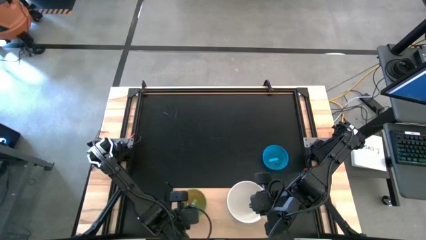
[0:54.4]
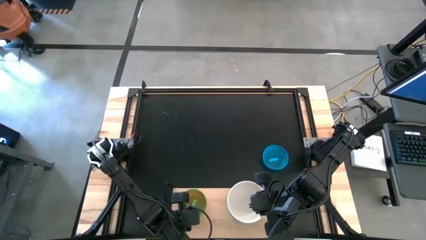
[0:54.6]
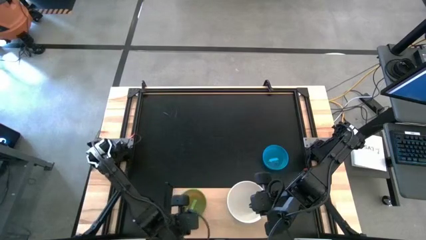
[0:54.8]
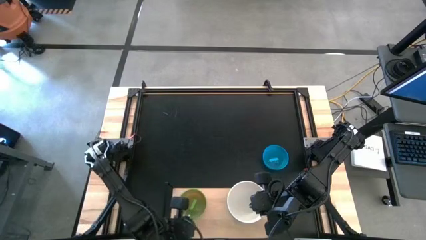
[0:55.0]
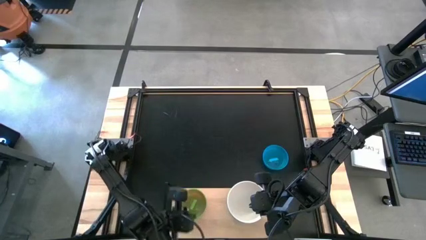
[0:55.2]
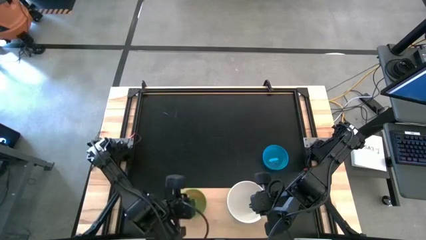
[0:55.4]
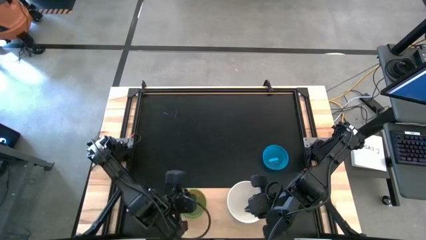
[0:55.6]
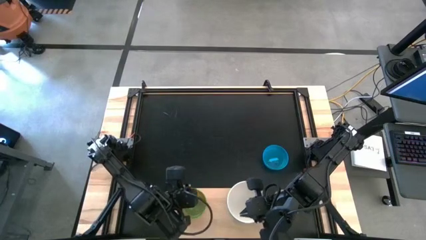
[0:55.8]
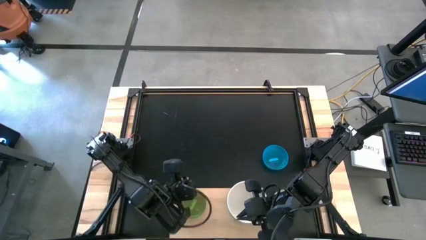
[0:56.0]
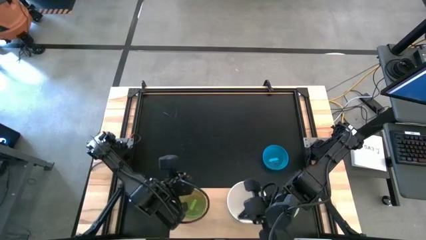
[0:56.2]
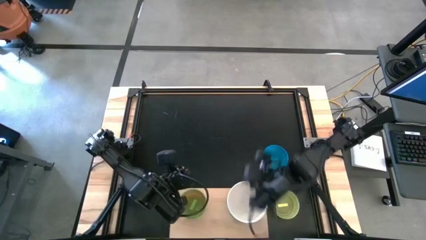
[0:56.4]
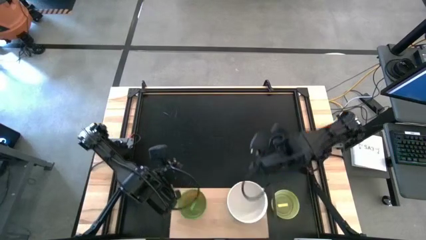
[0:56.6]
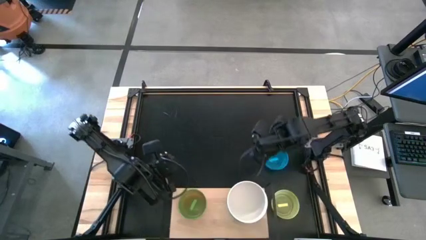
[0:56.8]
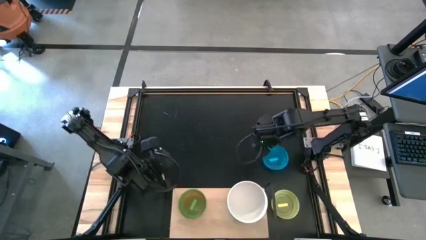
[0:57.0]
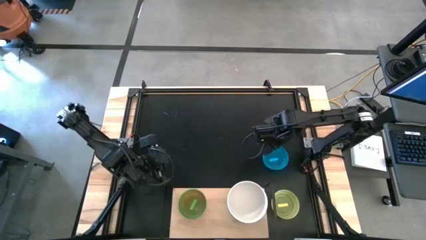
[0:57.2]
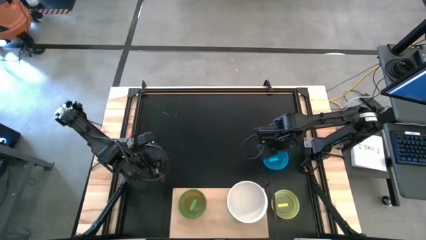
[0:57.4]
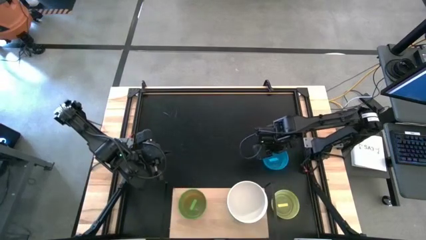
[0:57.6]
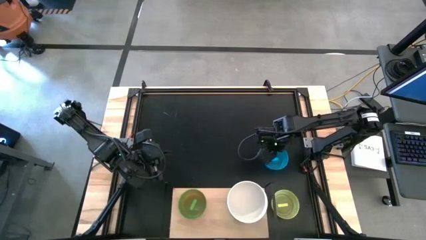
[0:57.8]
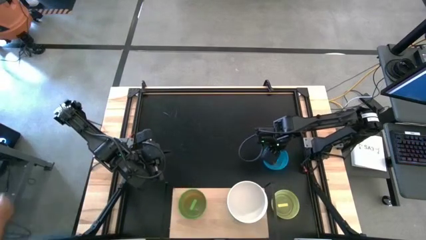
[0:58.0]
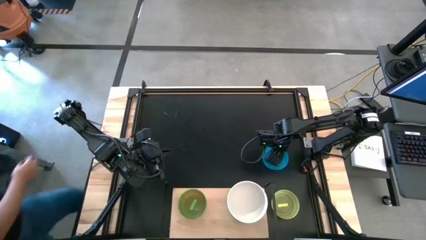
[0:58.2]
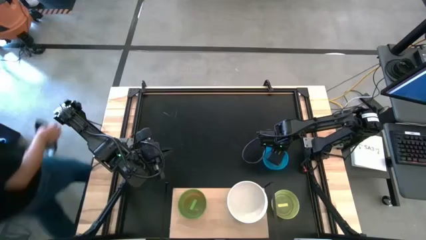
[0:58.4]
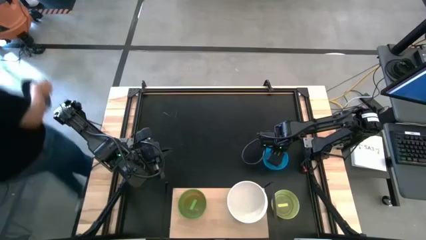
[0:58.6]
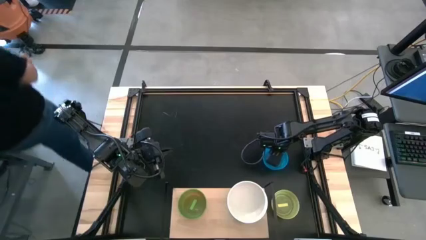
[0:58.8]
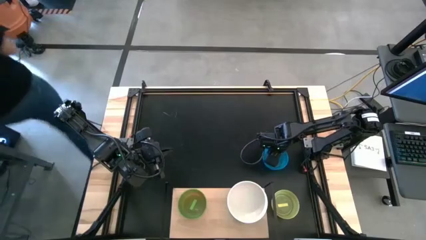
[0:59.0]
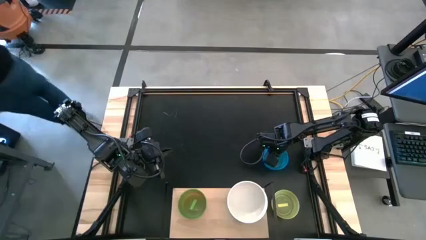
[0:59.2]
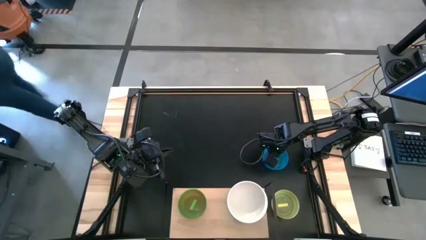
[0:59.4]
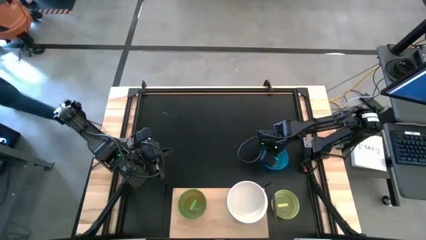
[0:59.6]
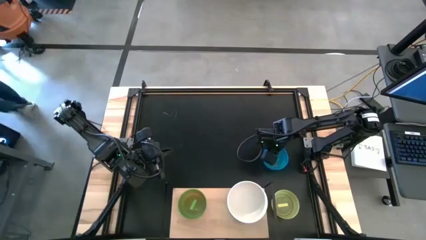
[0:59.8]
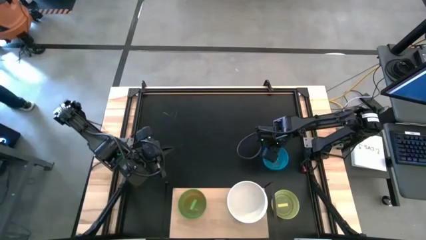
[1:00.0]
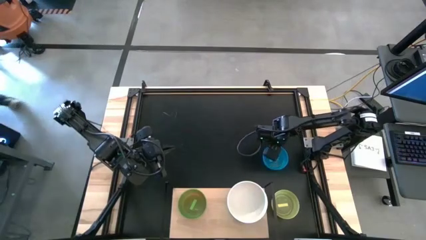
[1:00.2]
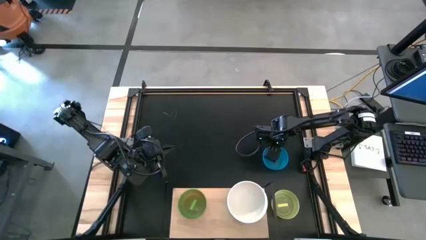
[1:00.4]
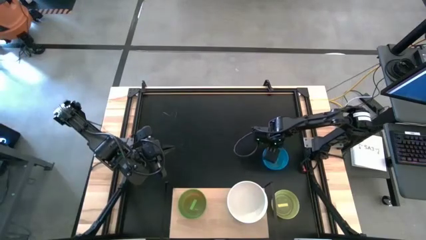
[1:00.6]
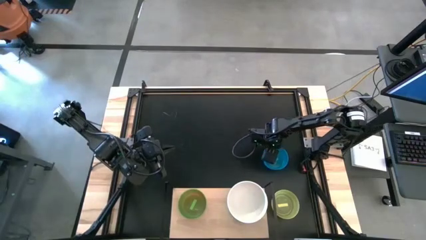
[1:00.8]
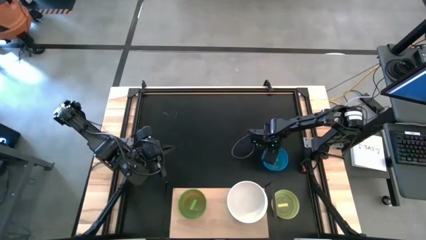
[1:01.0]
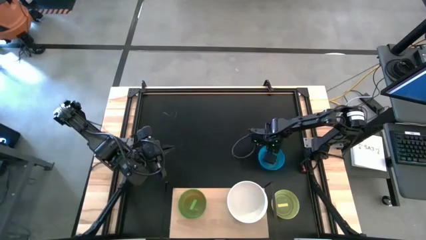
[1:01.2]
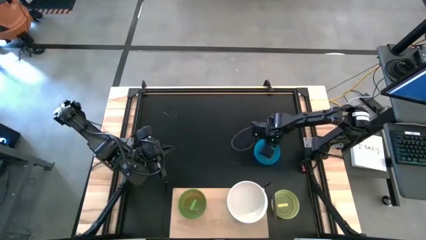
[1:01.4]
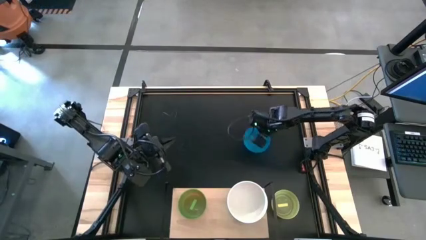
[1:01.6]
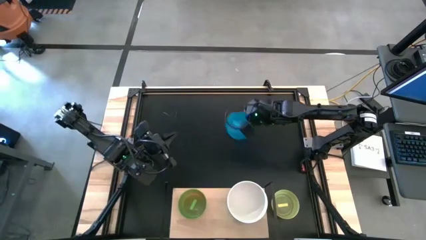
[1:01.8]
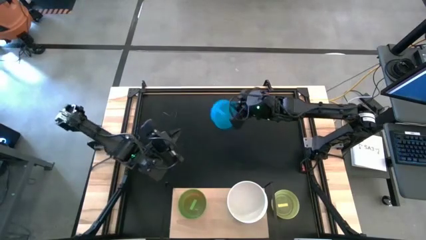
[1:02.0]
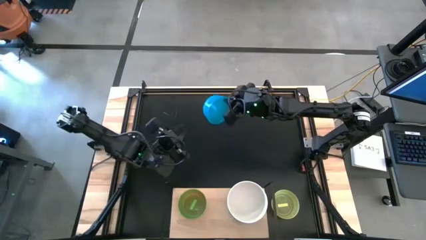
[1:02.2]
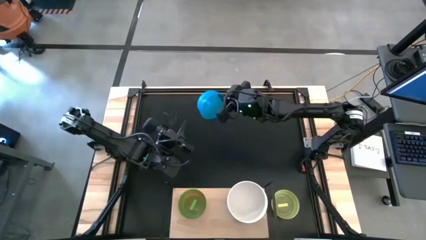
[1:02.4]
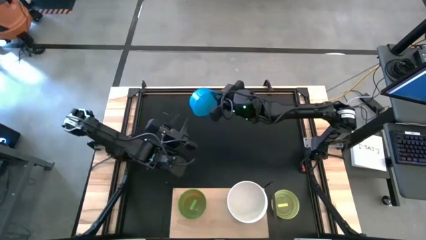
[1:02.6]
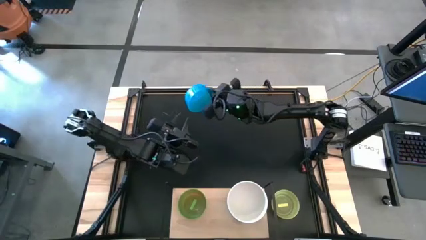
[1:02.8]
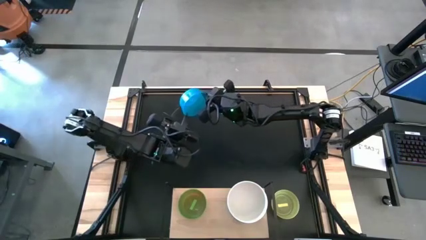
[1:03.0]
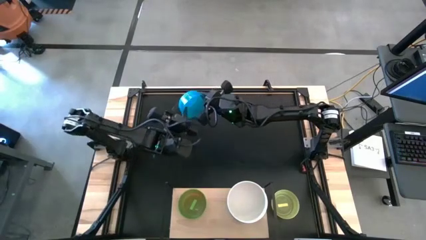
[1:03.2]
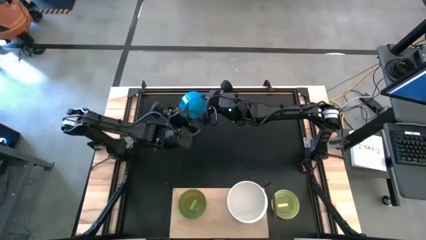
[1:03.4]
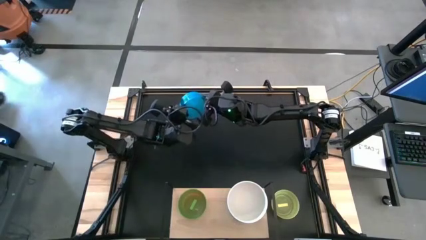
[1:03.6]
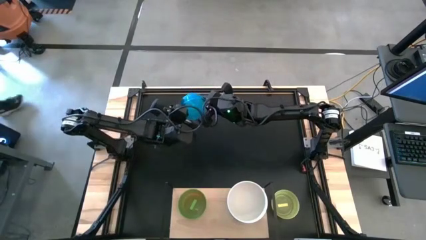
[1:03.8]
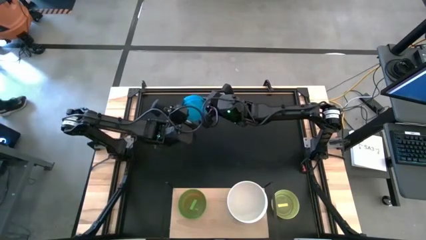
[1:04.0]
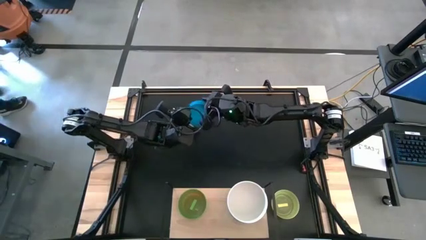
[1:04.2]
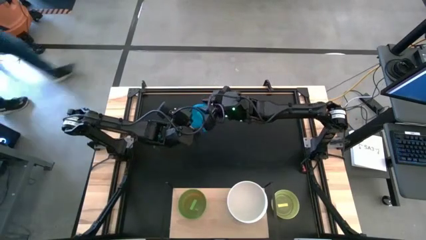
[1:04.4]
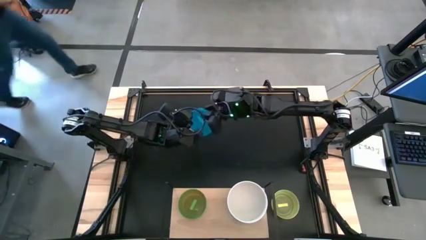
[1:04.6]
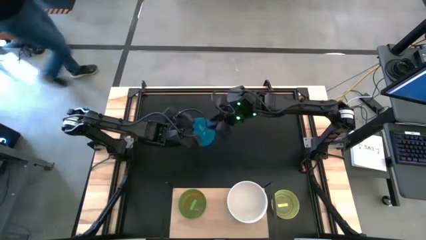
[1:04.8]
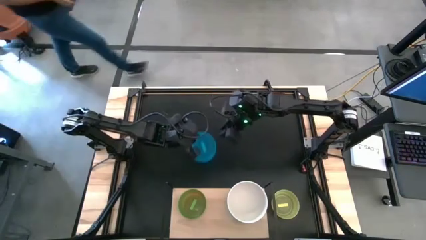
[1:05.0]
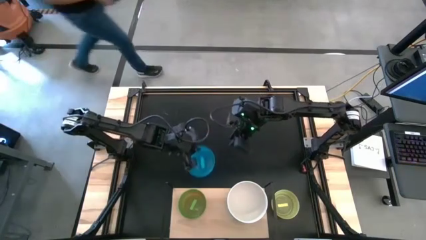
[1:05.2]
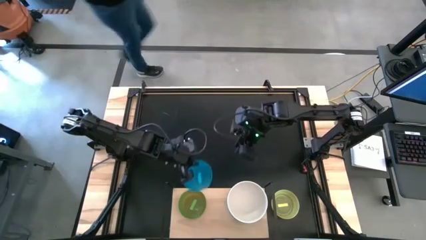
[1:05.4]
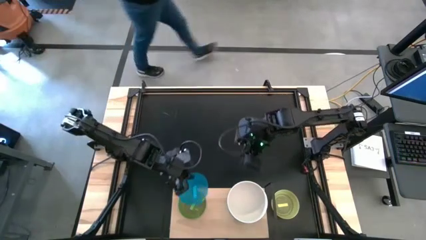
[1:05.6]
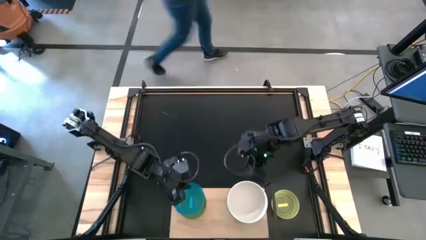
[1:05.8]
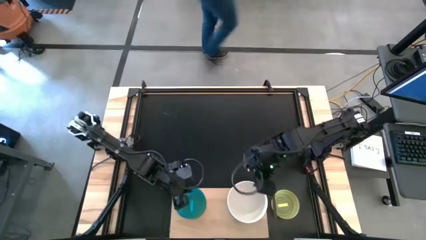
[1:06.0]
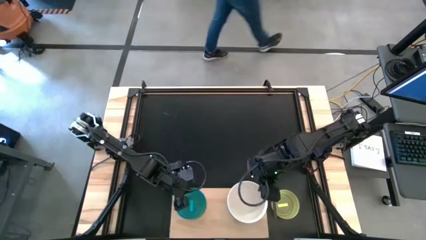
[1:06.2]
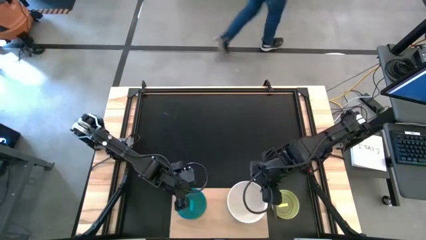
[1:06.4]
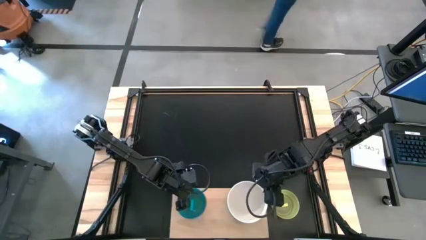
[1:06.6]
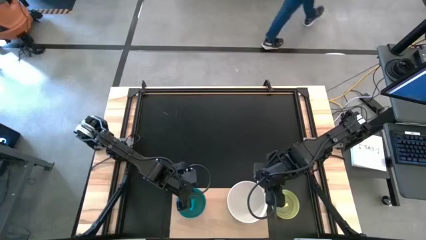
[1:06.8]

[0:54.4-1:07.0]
Task: Place and stack bowls onto a shelf
Stack the light blue bowl on top of the light green bowl on the shelf

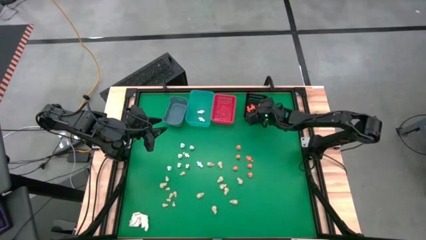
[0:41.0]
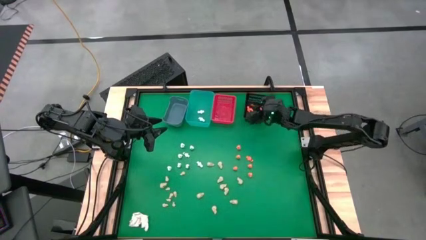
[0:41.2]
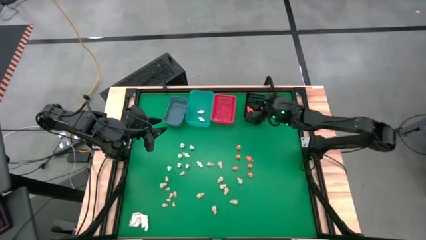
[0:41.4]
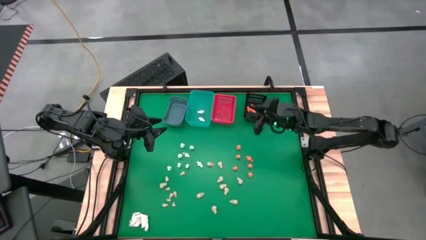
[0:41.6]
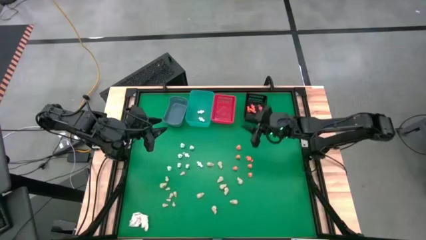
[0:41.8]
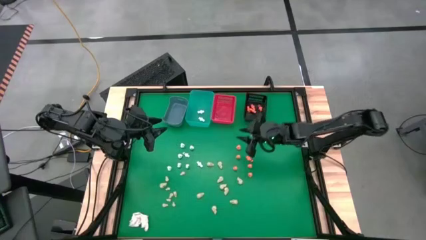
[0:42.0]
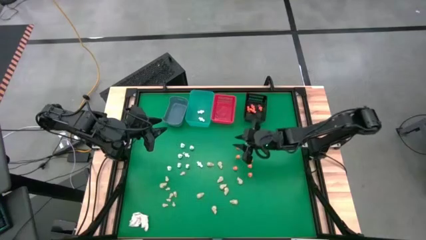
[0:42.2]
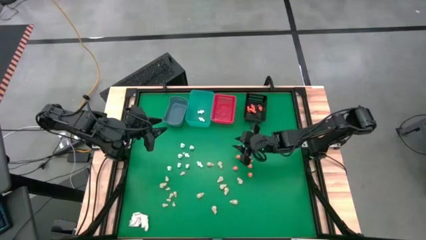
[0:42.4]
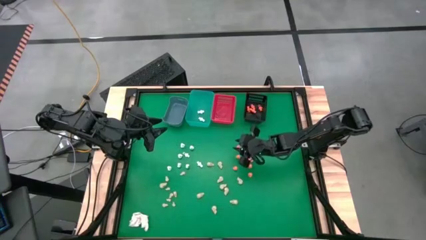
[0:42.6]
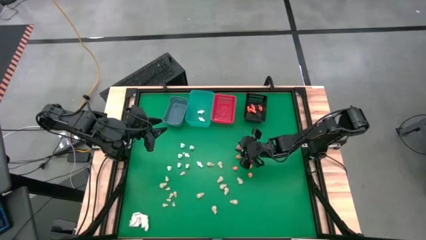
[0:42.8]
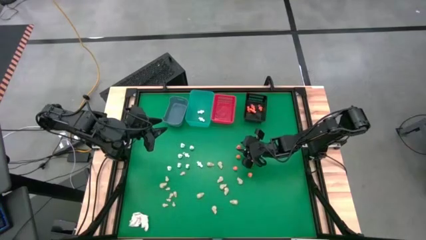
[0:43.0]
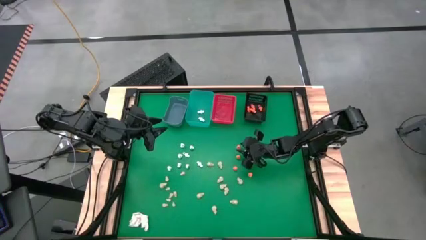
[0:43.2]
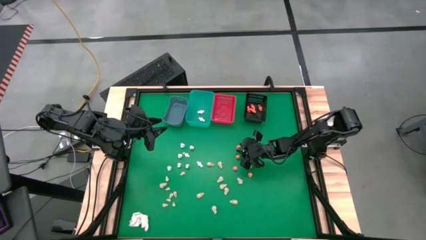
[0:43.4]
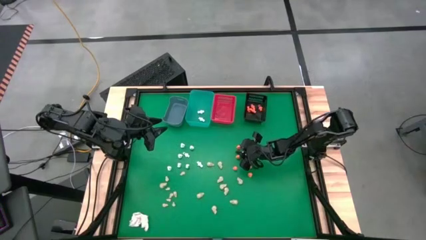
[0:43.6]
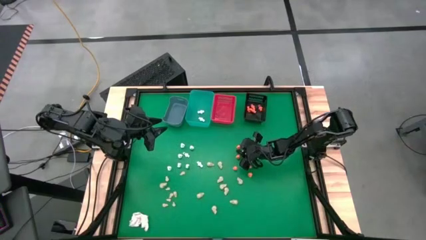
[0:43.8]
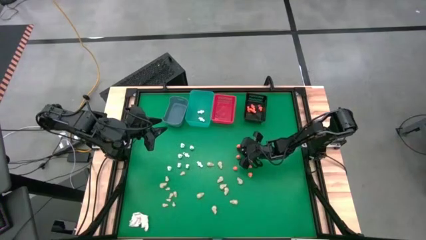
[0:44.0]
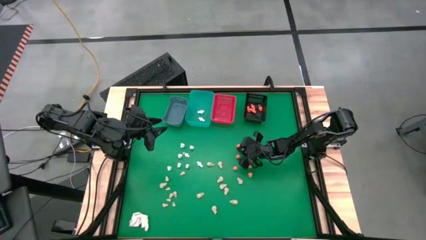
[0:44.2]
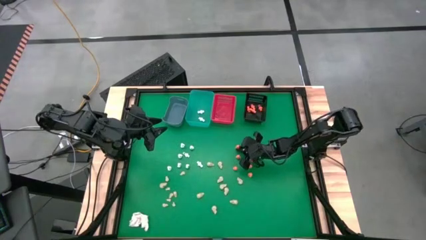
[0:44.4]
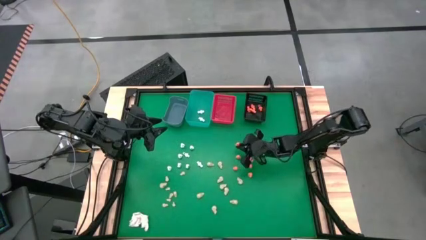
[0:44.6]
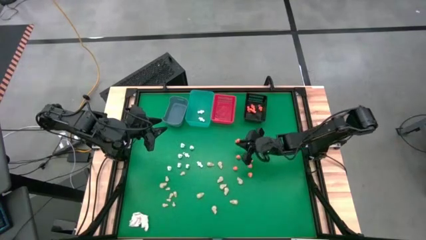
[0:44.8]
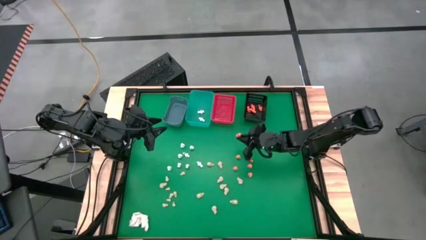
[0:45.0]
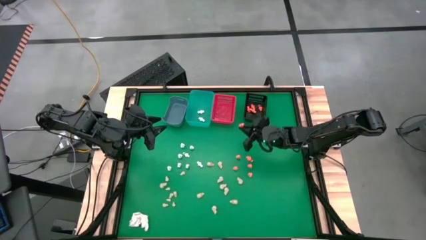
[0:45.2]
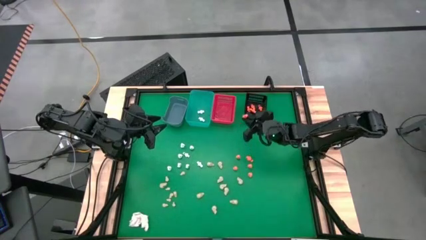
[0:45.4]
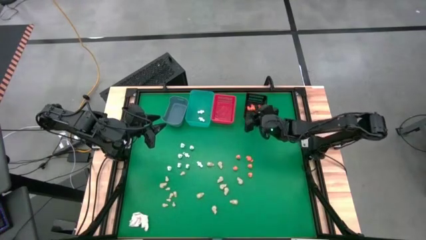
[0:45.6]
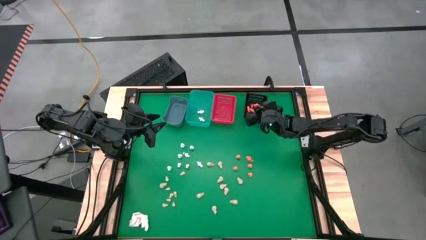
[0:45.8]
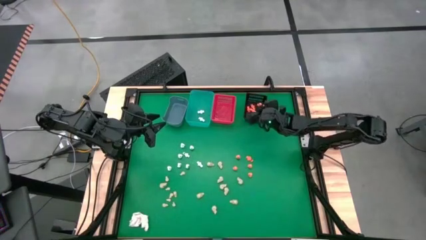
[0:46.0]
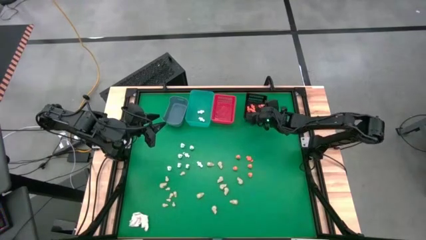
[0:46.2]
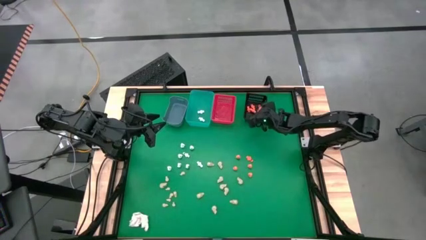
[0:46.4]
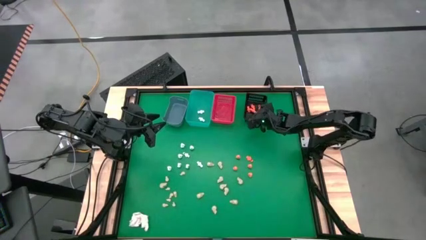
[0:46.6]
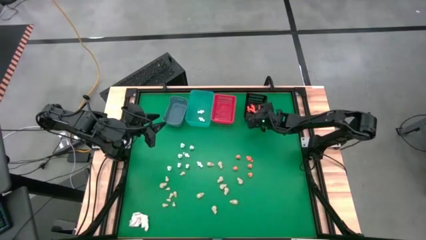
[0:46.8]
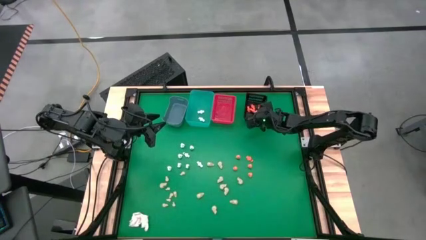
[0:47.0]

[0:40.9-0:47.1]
Task: Sort Halloween decoration
Put the orange skeleton toy into the black bin
